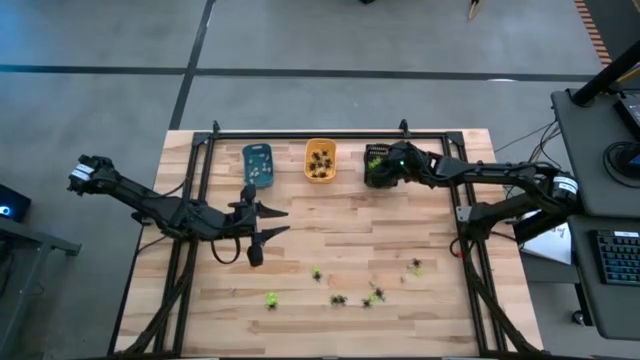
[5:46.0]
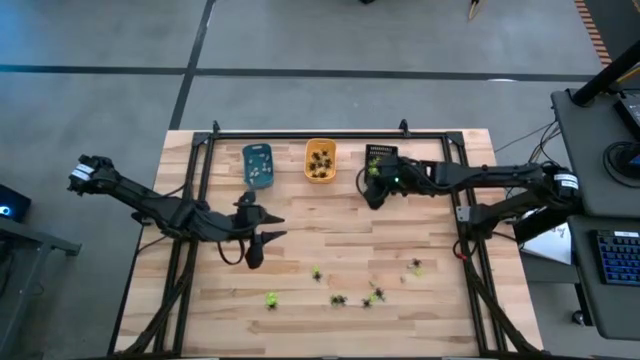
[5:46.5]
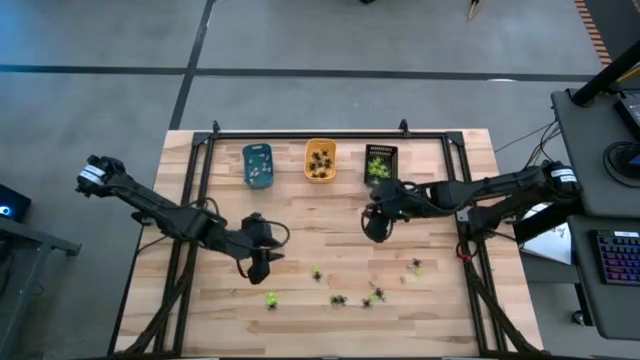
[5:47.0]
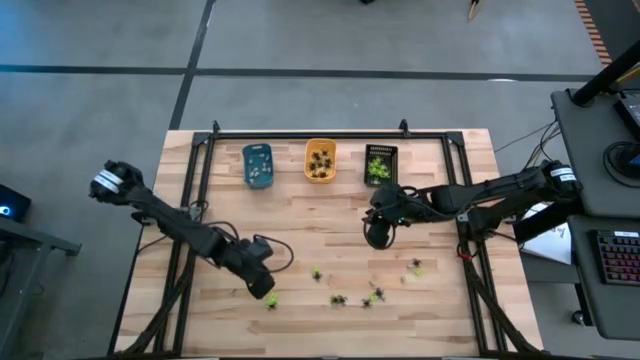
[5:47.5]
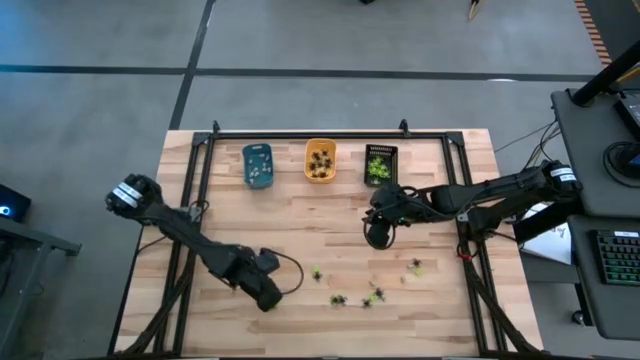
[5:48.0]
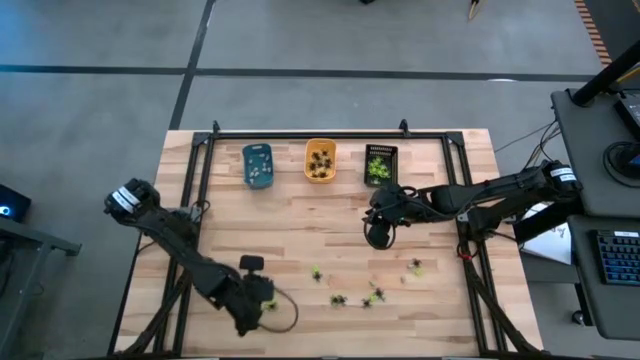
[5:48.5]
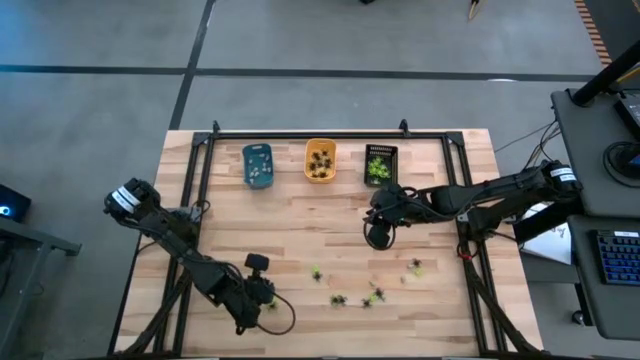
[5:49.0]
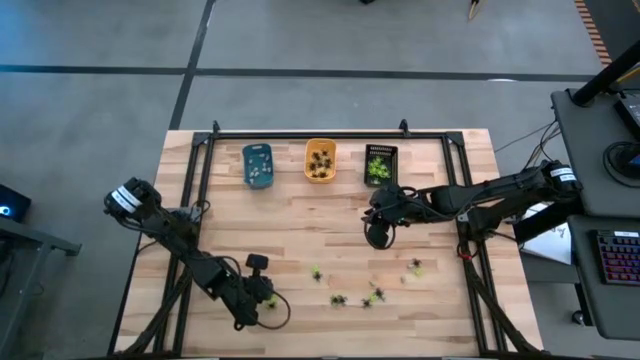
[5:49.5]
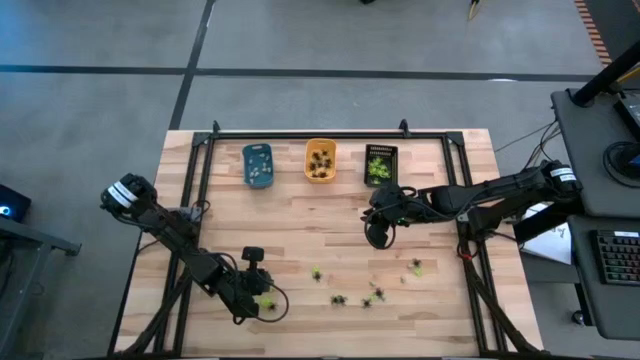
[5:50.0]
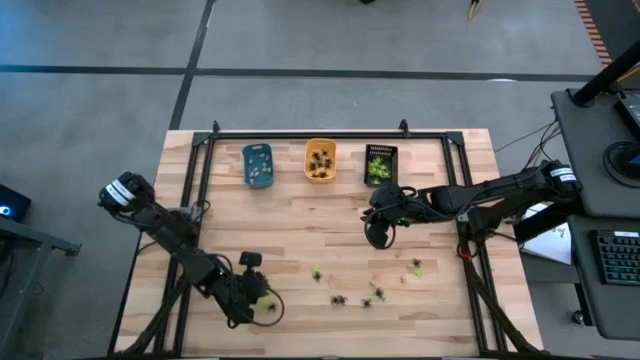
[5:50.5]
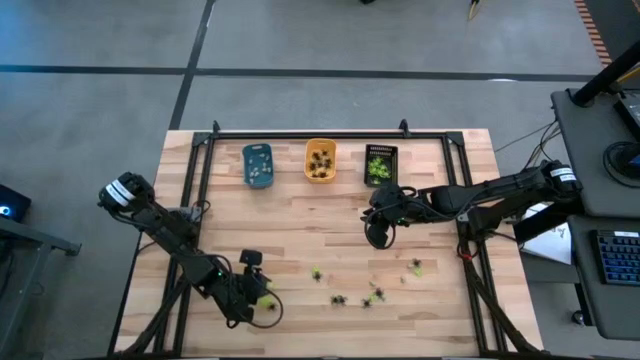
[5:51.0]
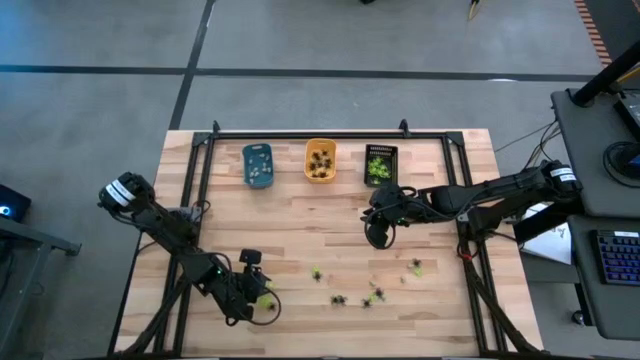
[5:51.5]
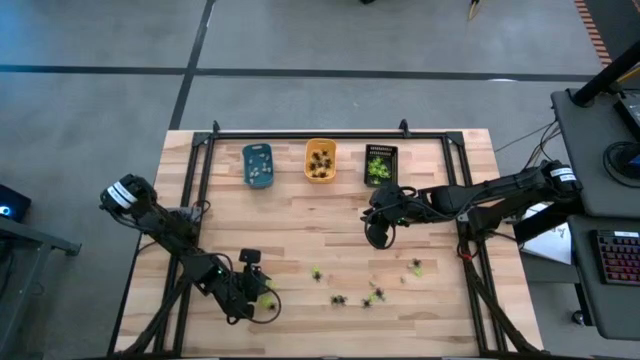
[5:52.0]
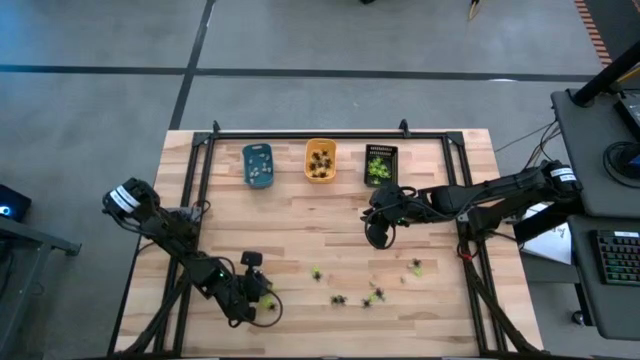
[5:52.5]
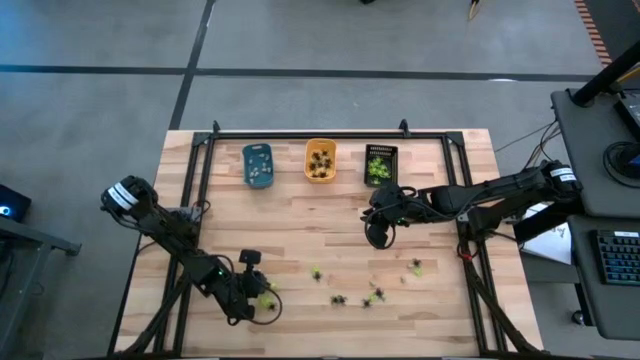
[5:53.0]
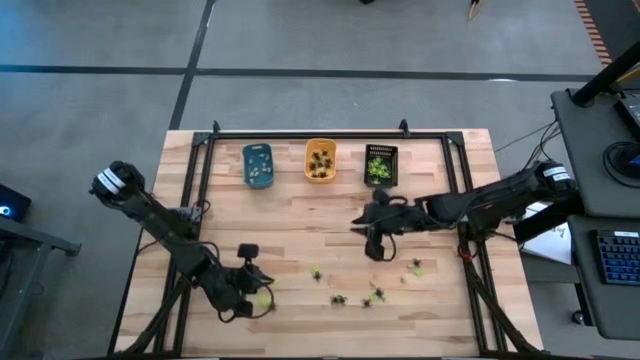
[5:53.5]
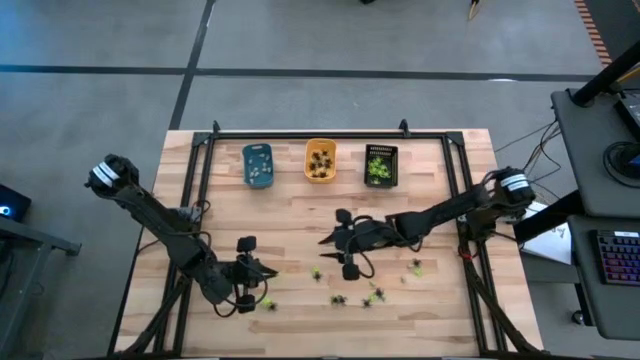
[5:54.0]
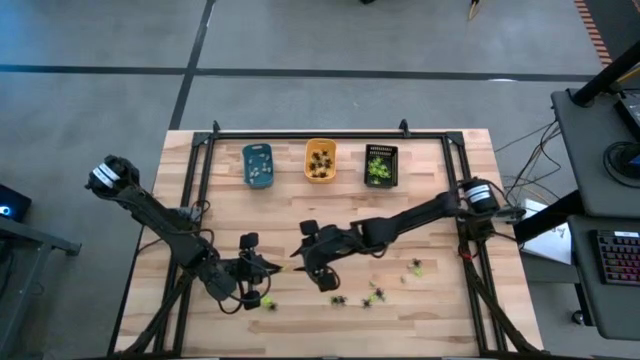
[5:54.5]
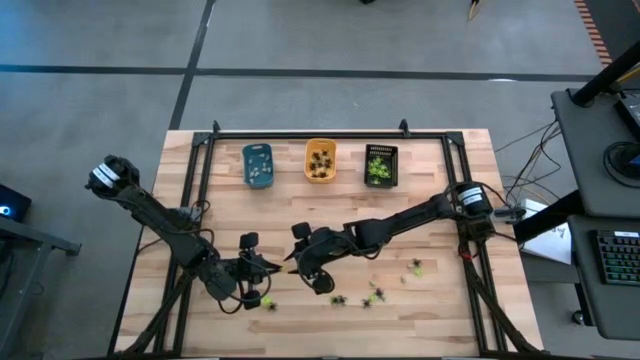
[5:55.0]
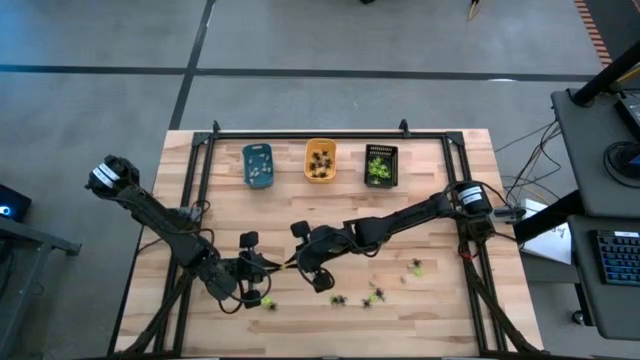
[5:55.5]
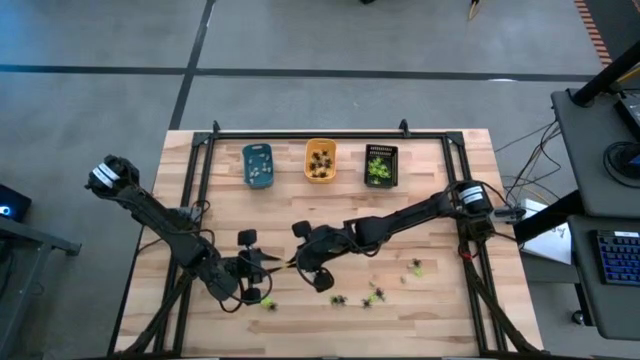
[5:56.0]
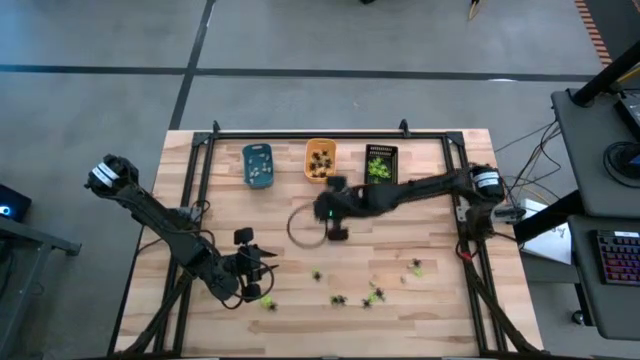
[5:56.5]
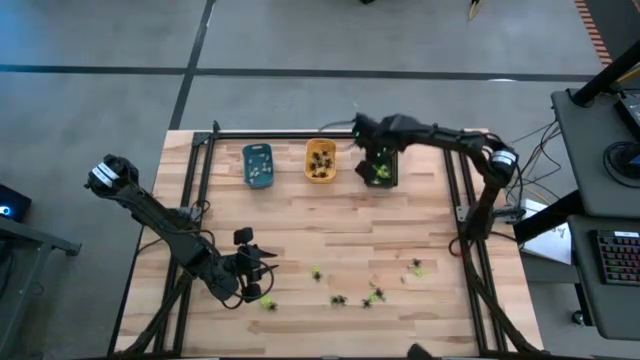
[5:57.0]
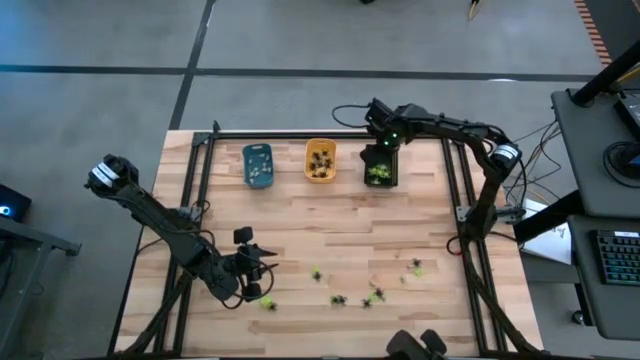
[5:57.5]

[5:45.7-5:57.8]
Task: Sort Halloween decoration
Put the green spider toy into the black bin

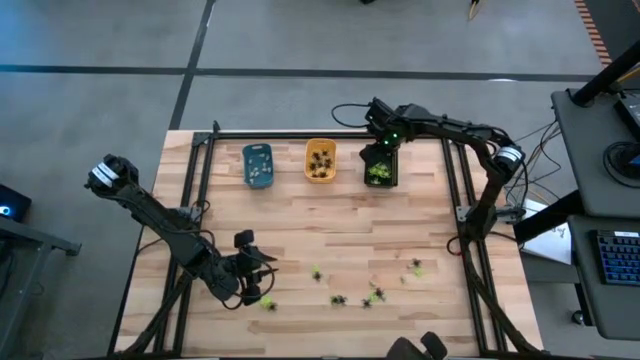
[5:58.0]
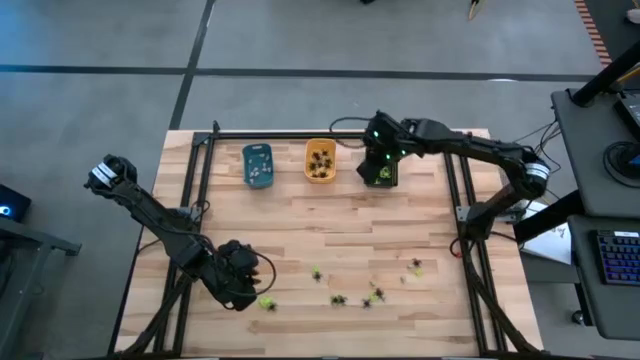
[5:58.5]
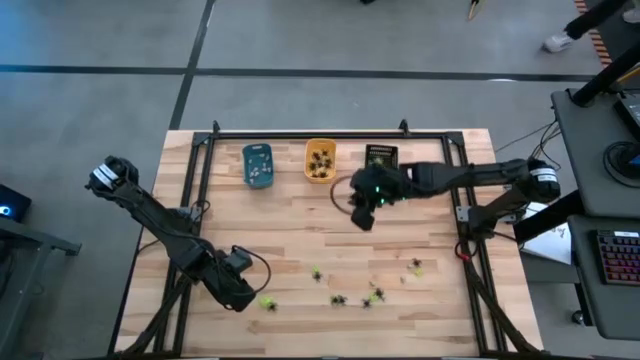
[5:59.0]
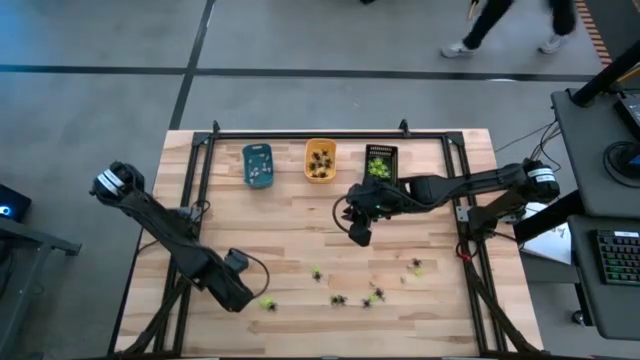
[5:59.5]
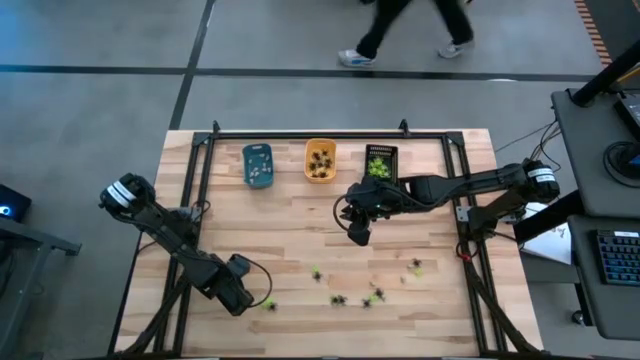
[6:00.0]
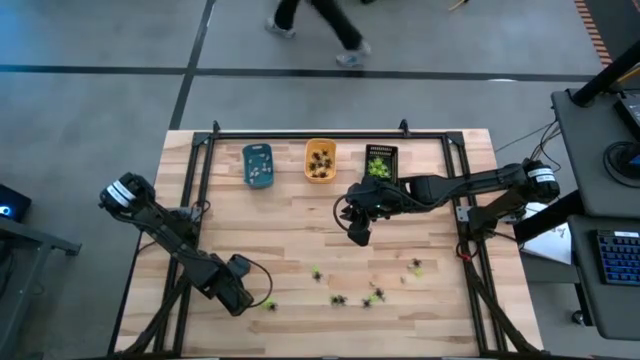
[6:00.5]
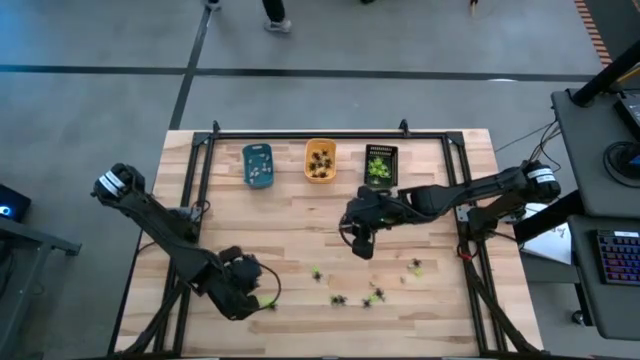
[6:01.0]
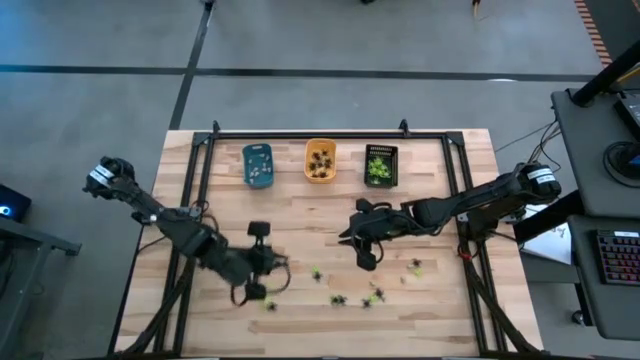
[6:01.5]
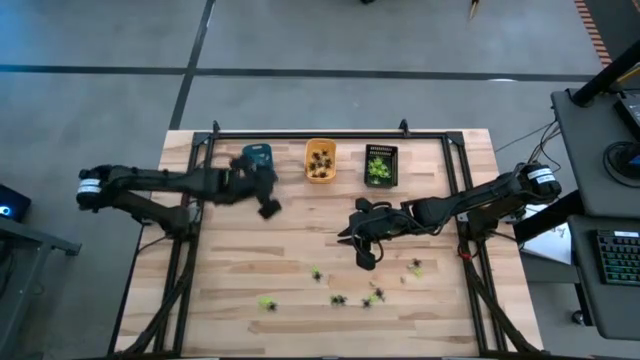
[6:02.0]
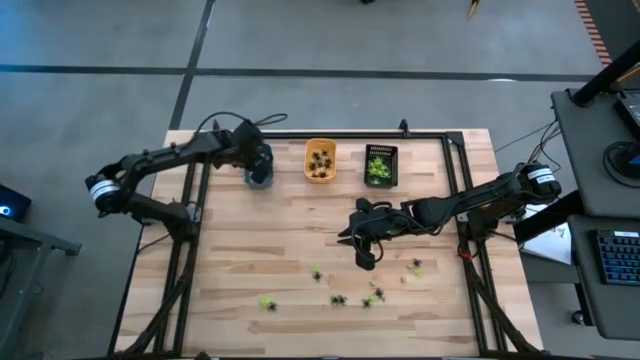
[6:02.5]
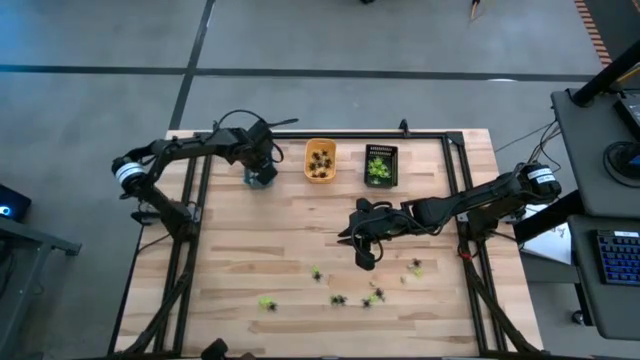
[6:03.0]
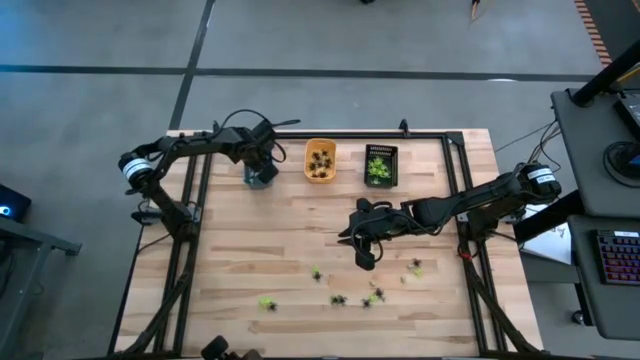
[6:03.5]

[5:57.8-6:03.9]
Put the white skull toy into the blue bin
